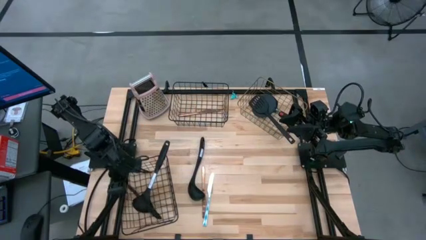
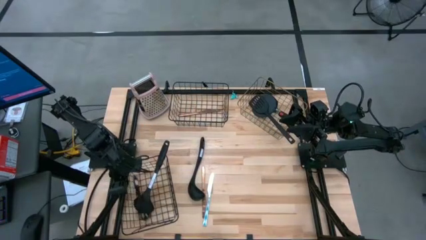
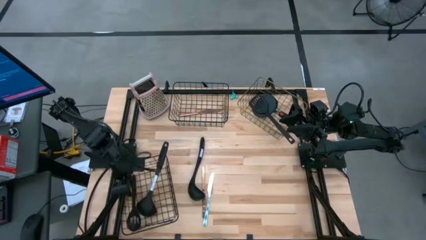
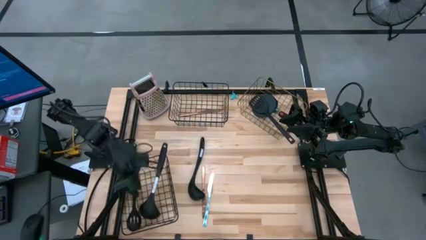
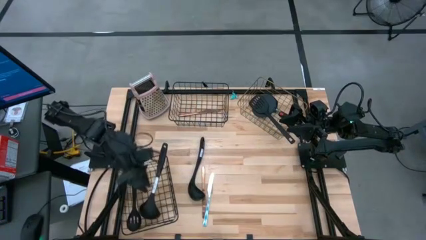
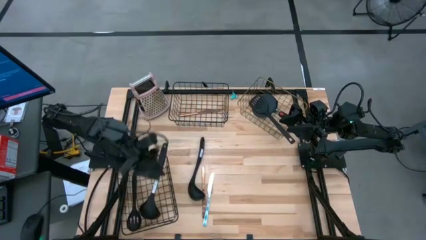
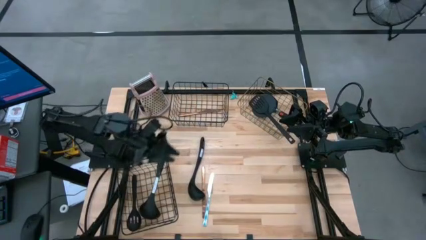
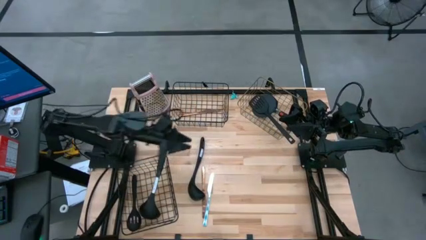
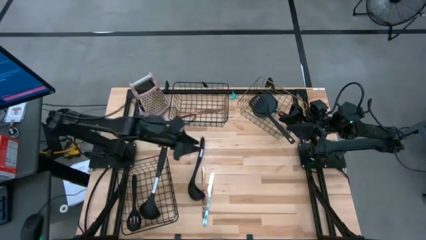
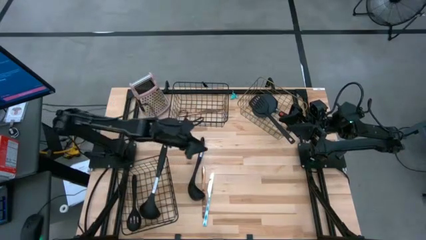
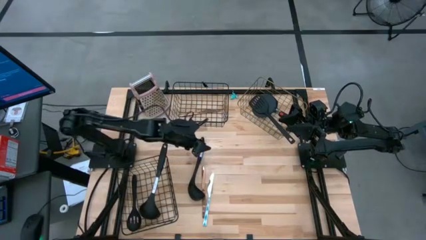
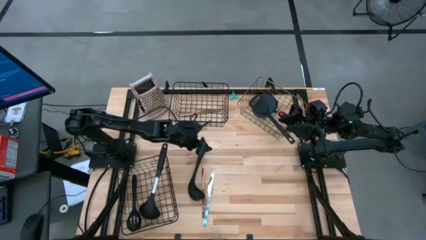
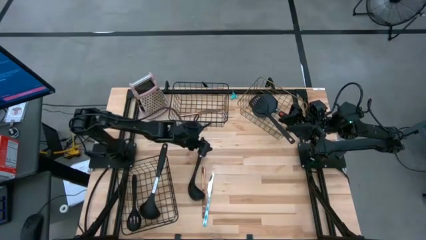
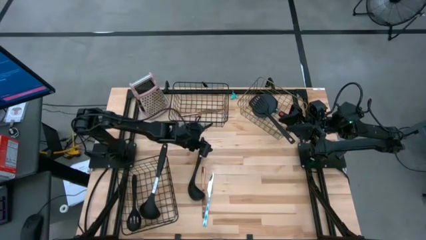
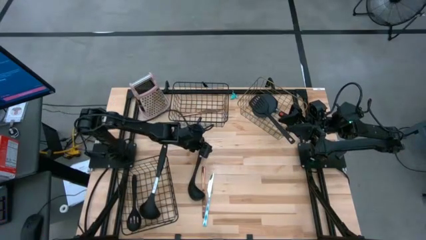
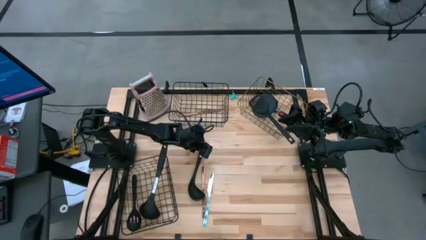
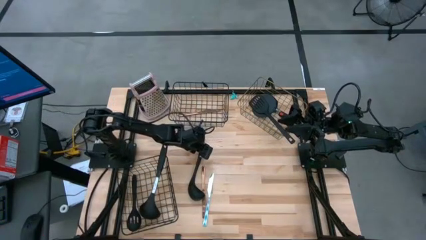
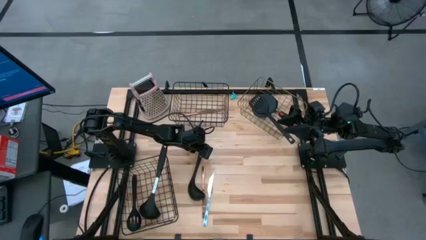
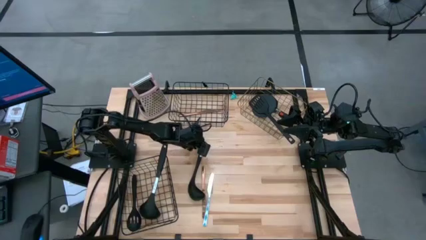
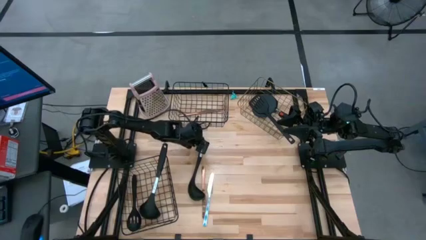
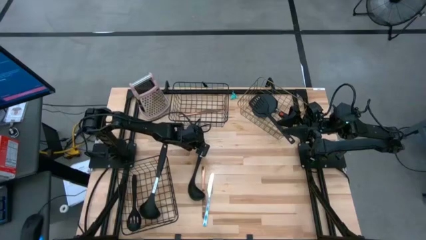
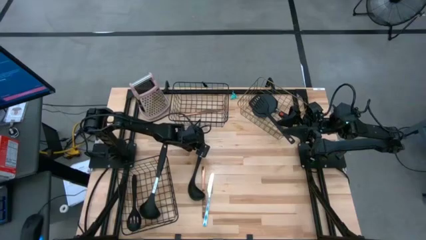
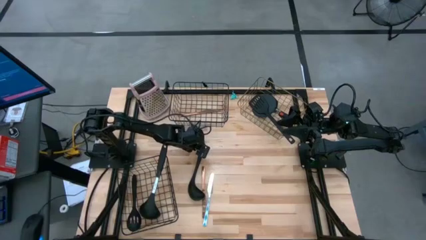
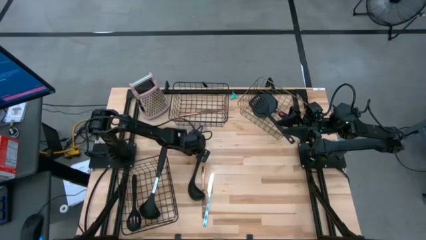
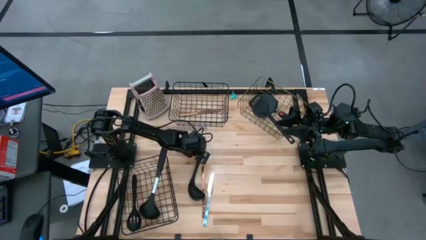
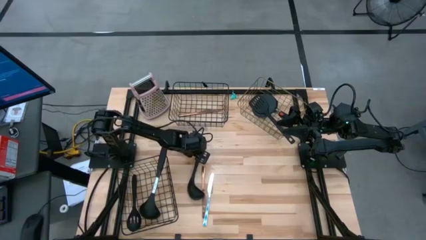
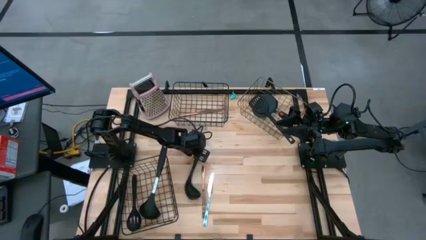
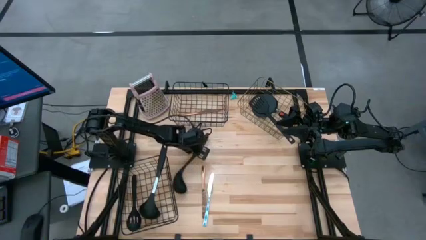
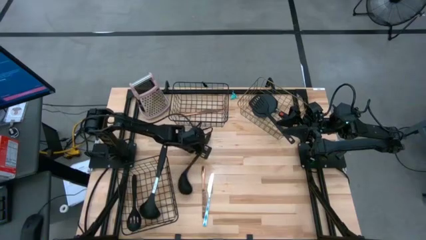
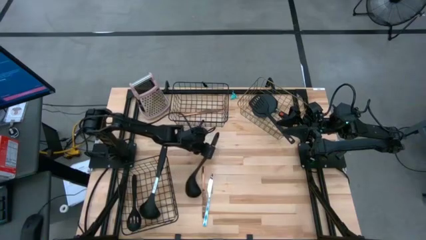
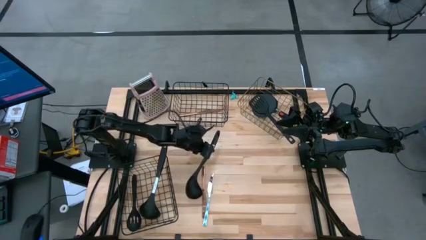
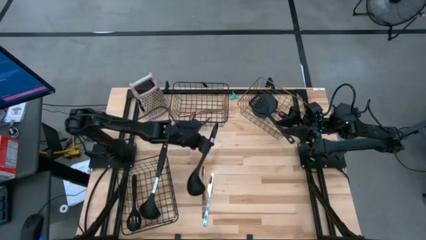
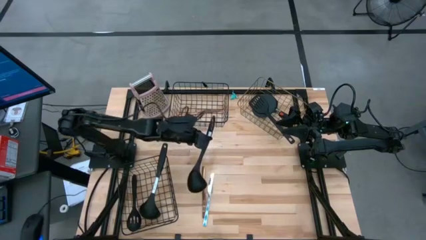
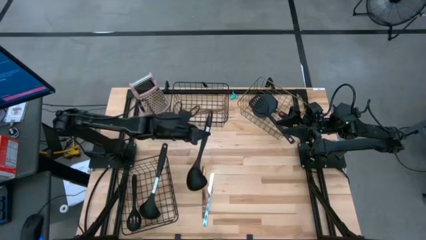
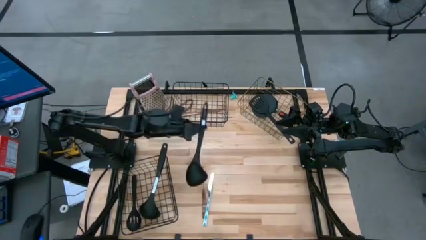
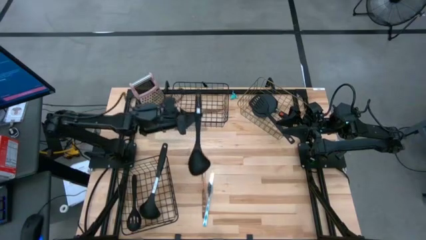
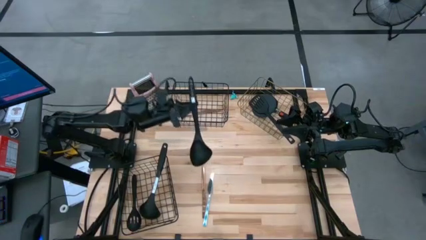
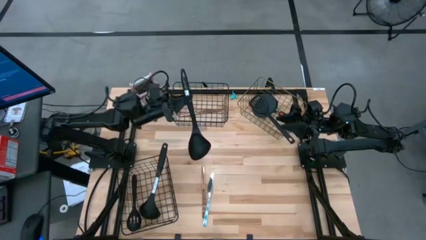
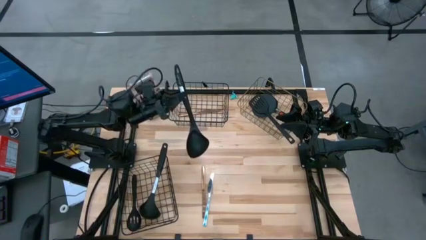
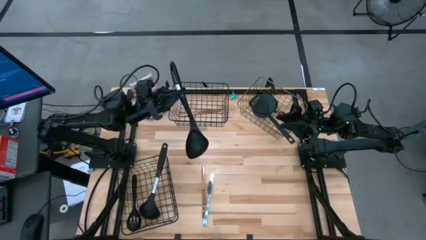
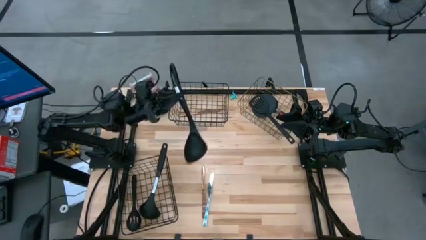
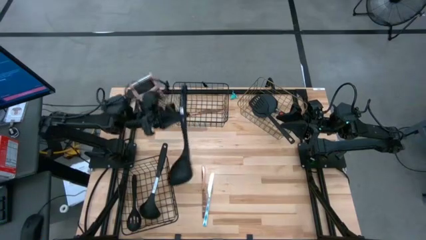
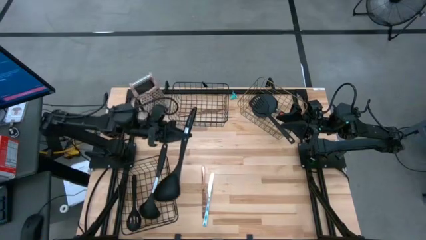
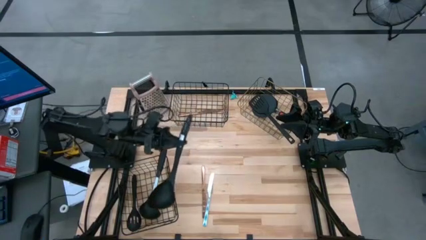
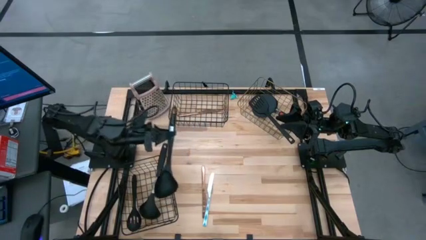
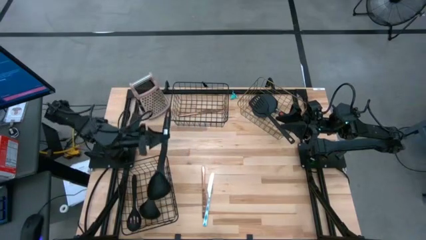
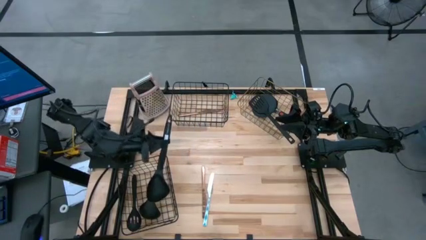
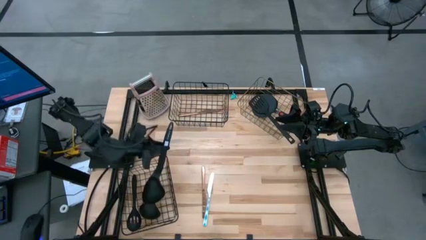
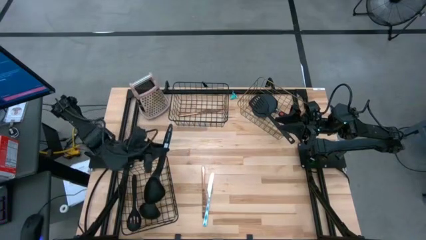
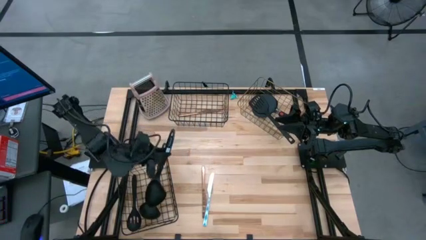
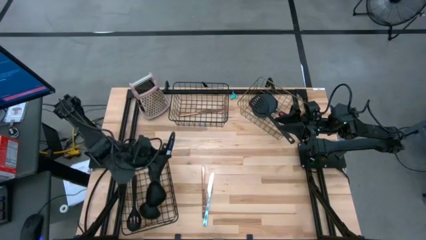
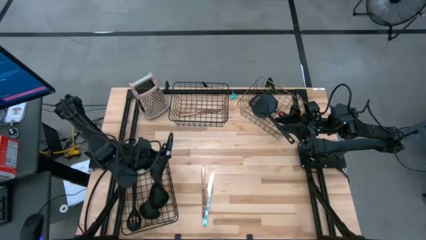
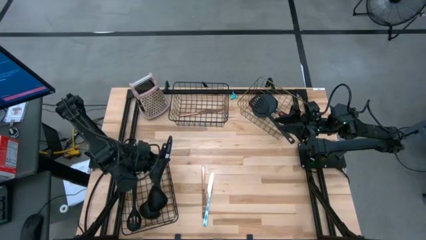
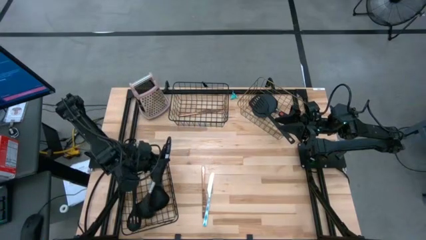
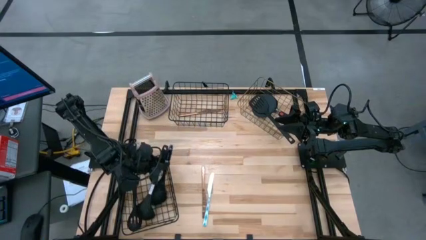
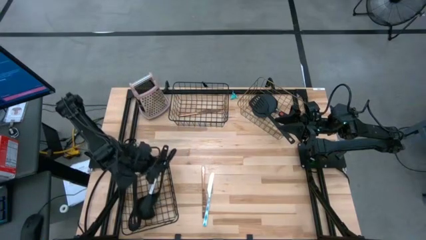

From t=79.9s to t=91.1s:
Task: Pick & Place Kitchen Items
Put the black serving spoon into the bottom black wire basket

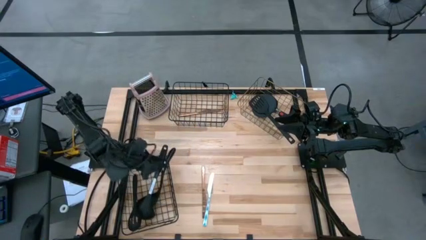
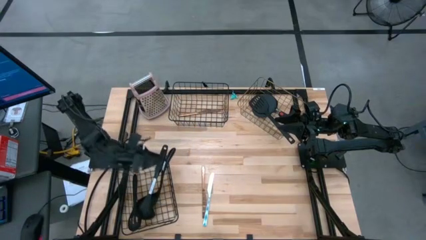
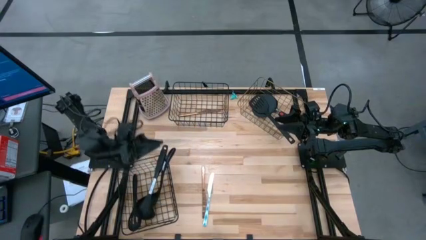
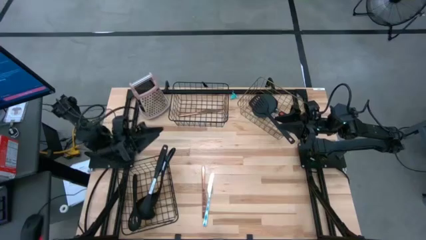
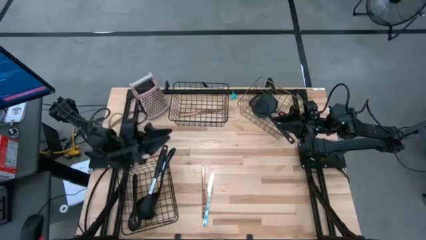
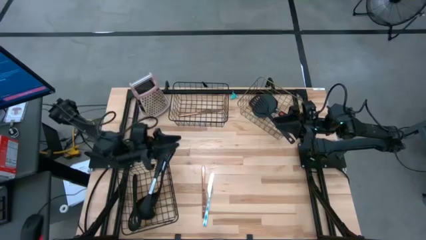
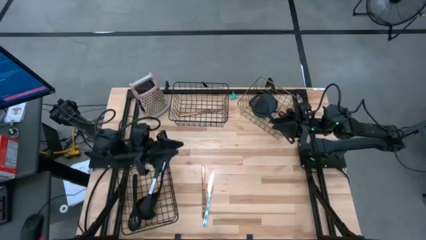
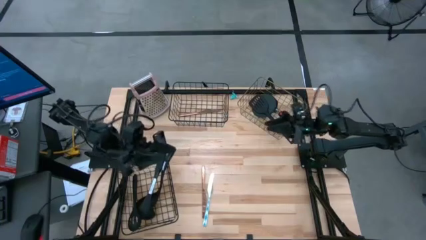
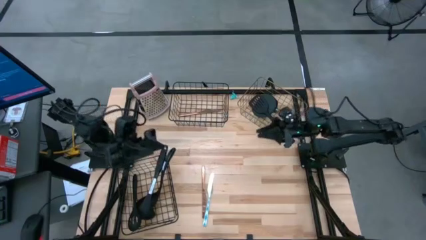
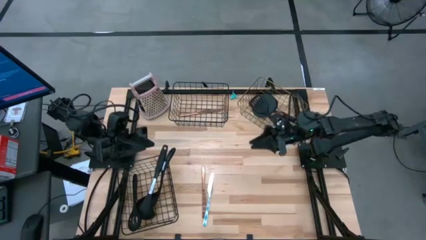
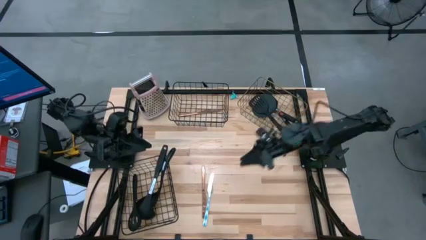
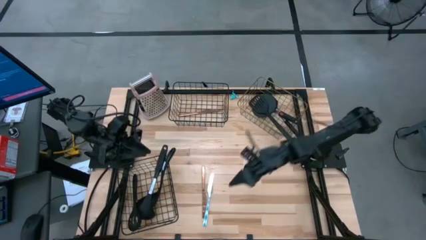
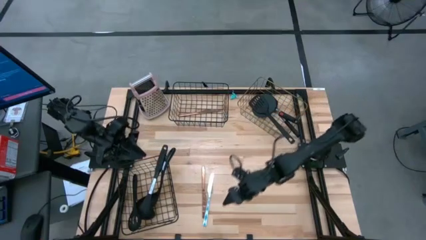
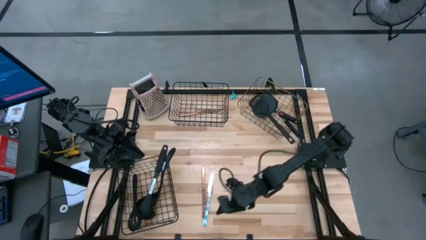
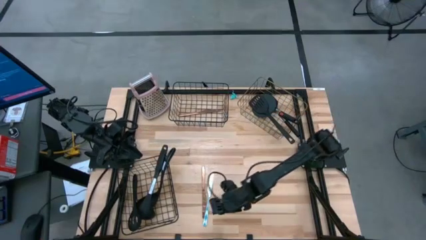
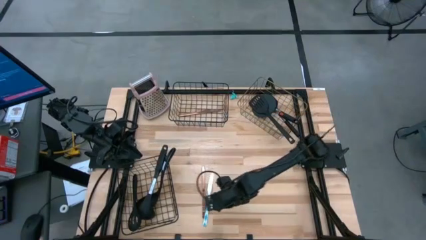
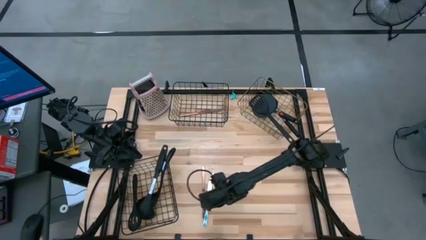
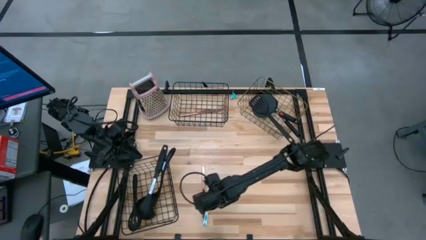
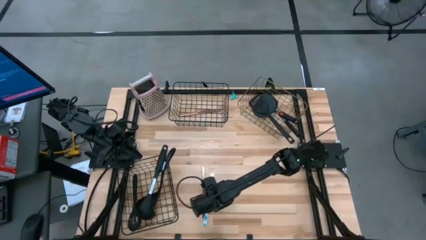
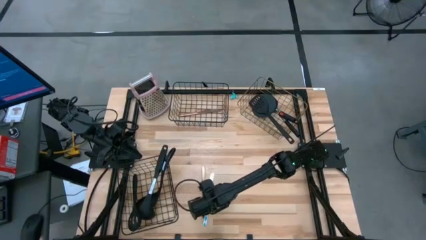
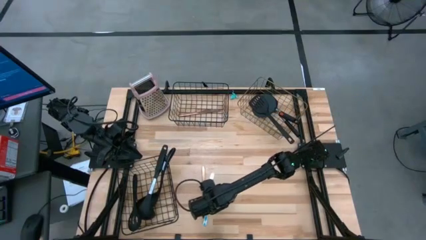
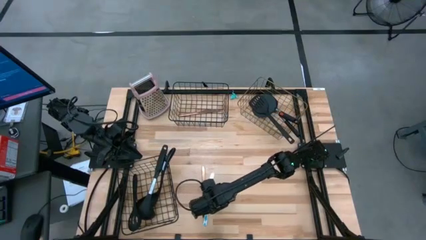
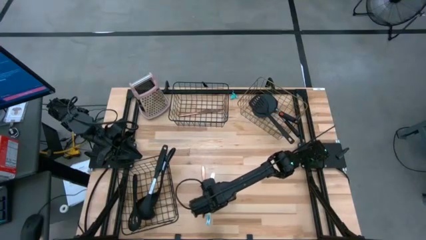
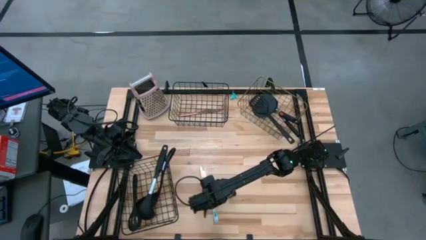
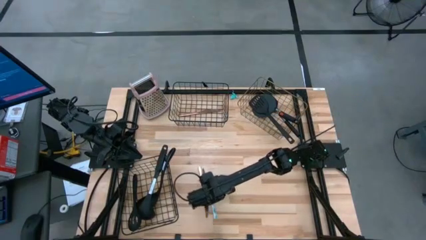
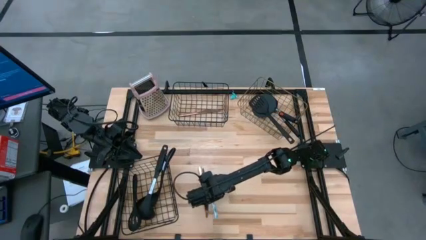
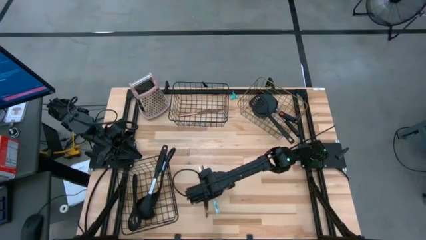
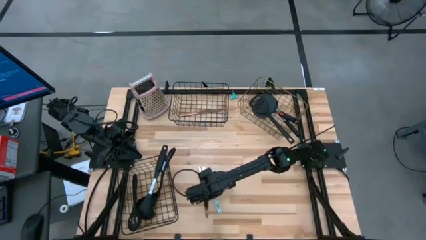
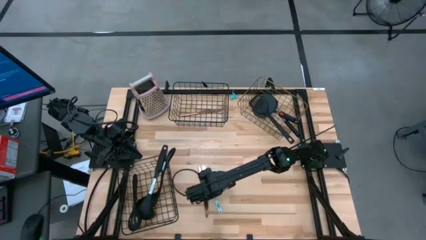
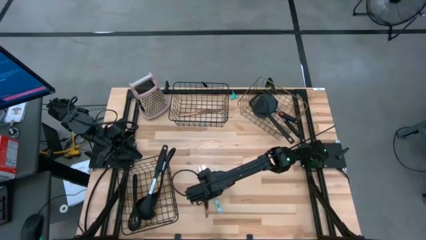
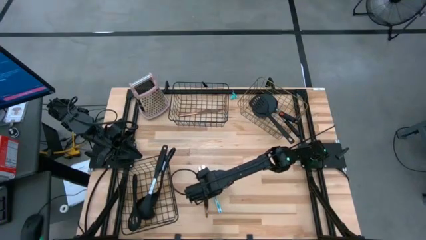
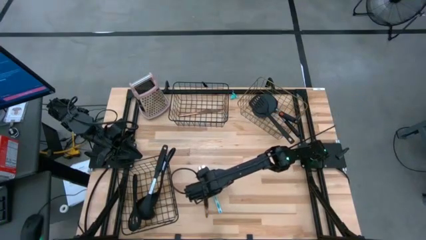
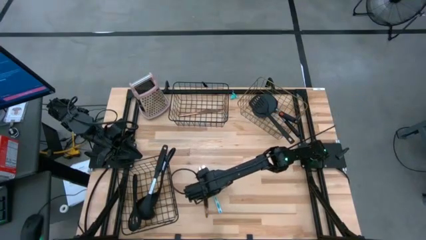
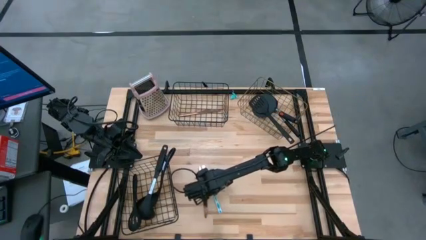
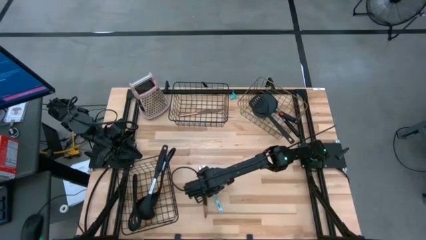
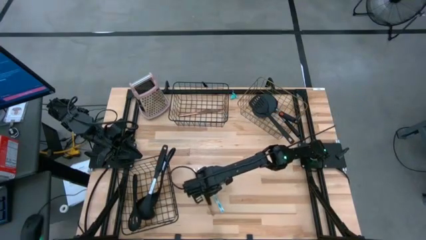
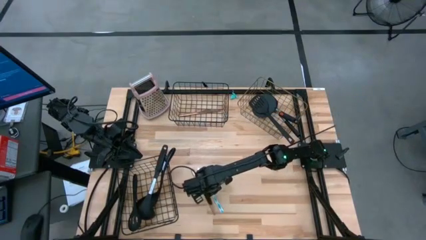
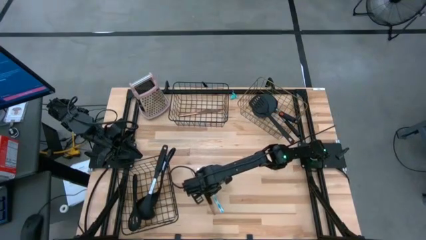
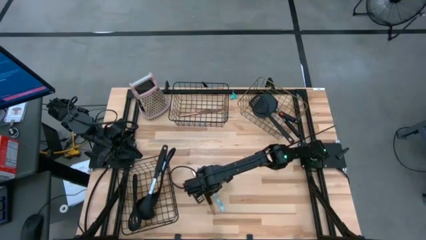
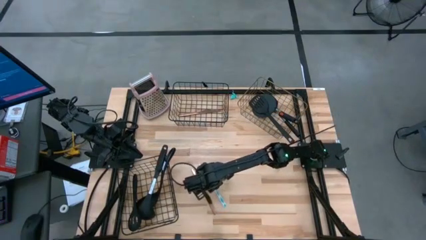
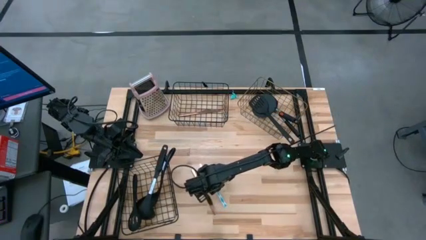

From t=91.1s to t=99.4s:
Put the blue knife into the top black wire basket
